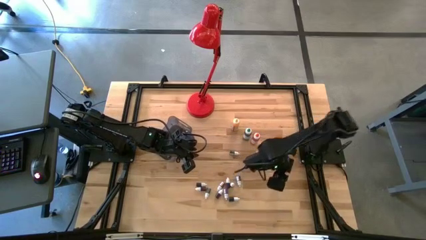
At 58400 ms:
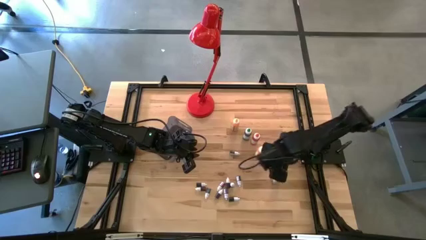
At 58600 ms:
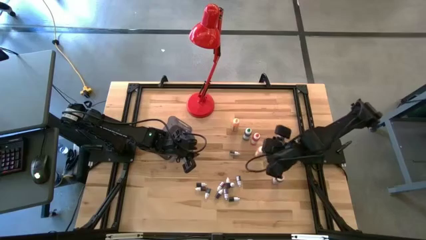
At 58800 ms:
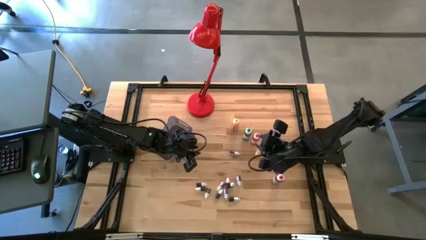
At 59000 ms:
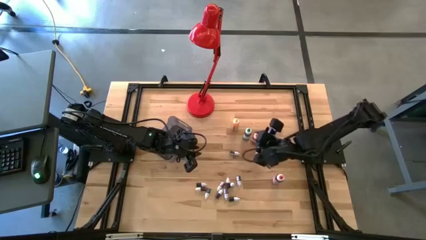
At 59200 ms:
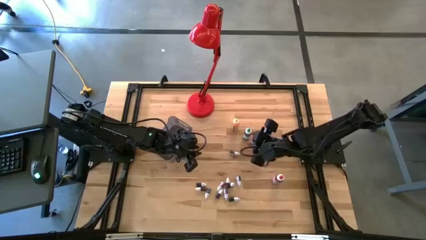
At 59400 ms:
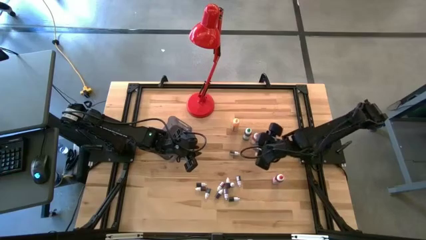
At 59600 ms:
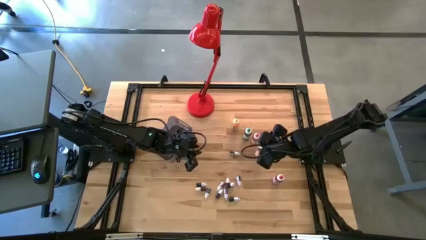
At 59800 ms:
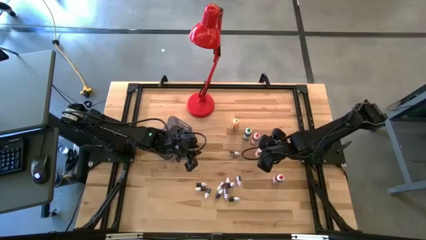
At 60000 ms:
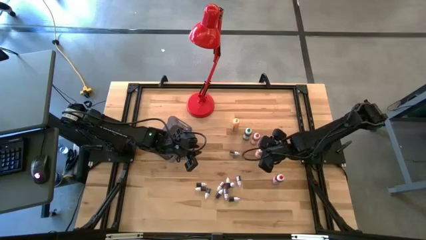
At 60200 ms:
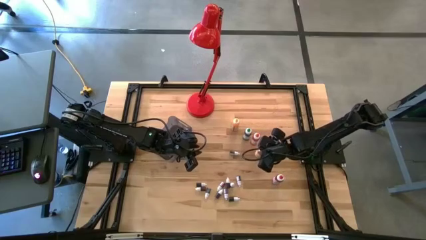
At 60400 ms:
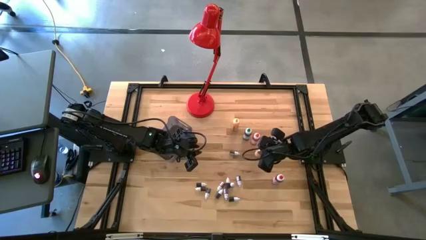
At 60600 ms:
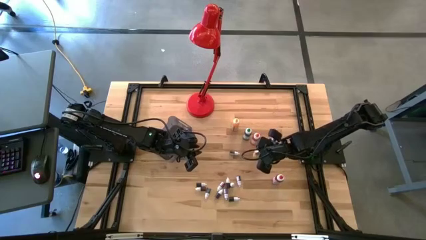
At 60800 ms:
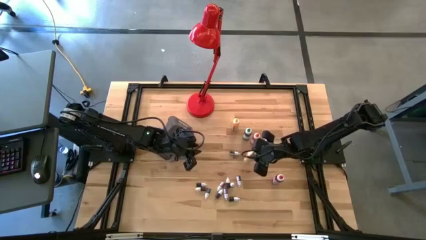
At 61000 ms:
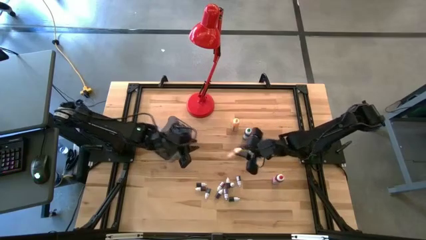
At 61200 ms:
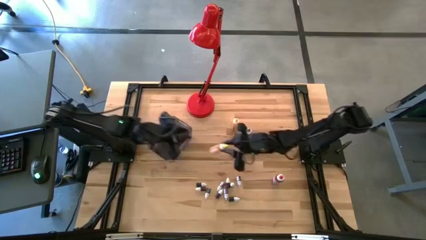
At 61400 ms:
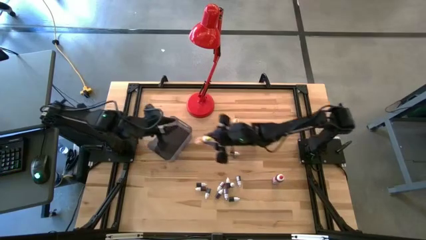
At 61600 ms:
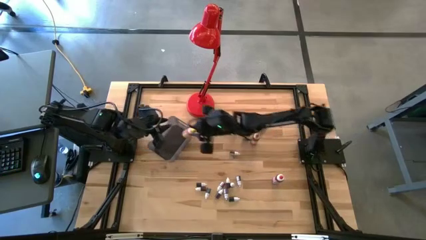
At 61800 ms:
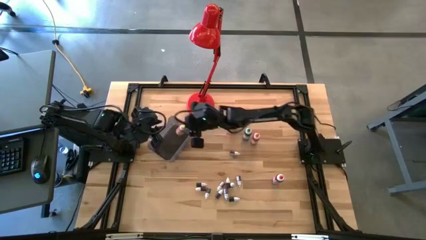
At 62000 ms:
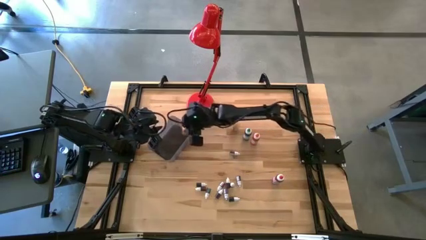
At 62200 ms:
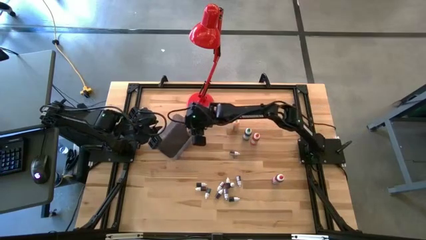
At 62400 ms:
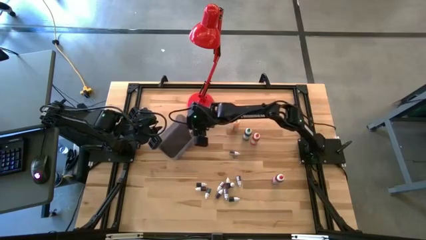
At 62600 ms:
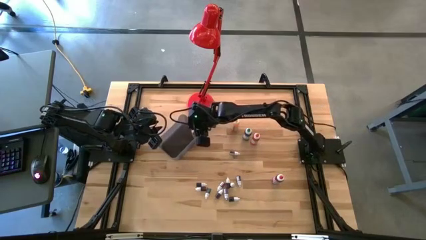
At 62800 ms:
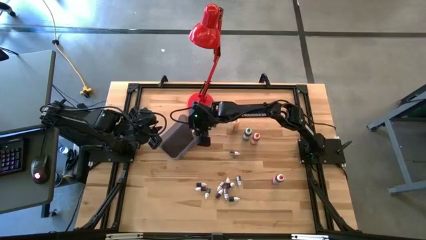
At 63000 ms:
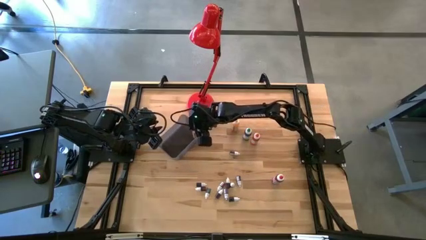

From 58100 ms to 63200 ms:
Task: Pick & Place food coloring
Put the bottom large yellow food coloring bottle into the black bin

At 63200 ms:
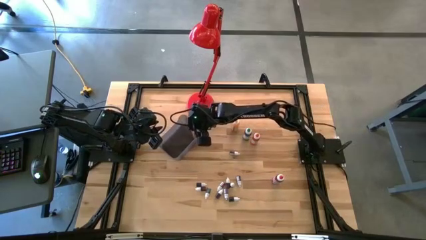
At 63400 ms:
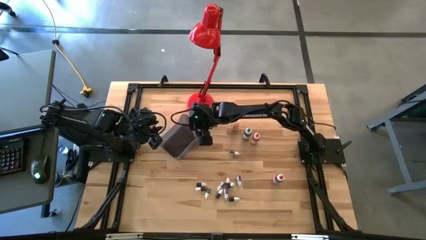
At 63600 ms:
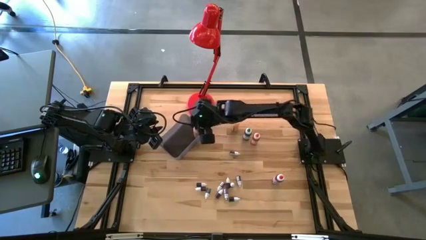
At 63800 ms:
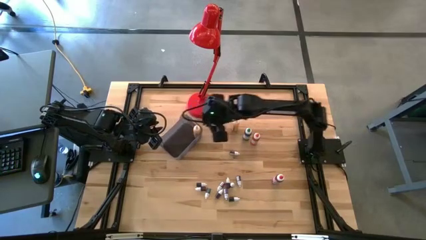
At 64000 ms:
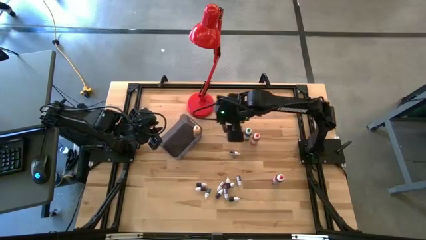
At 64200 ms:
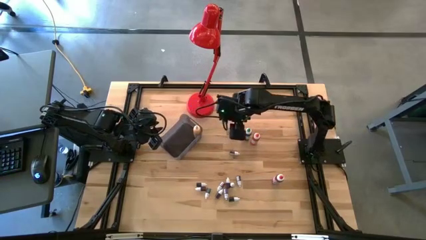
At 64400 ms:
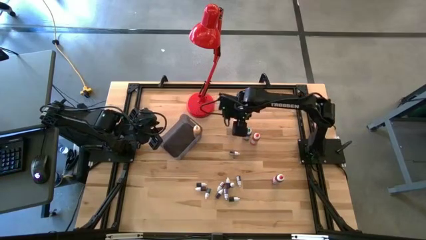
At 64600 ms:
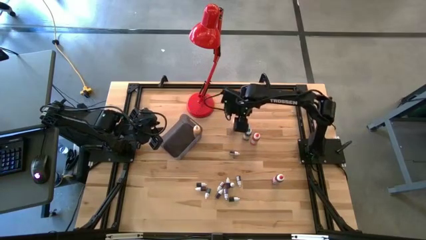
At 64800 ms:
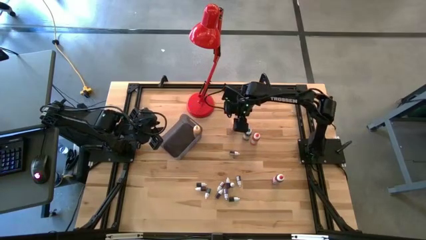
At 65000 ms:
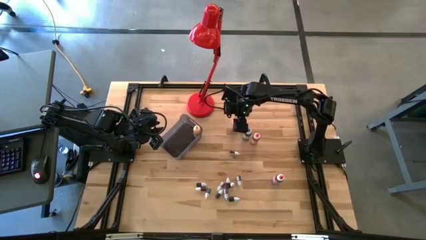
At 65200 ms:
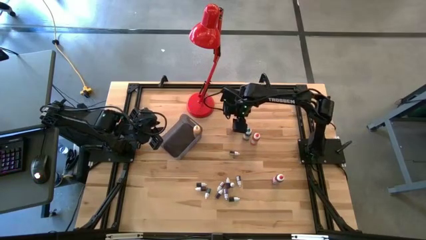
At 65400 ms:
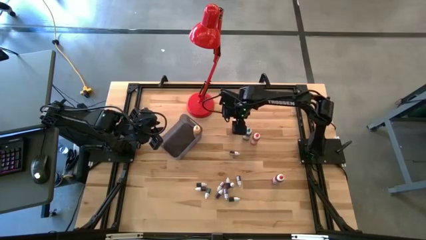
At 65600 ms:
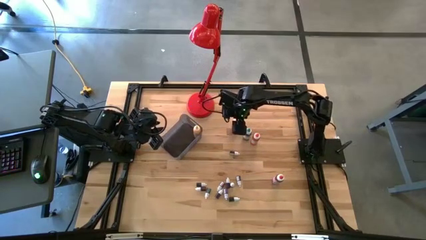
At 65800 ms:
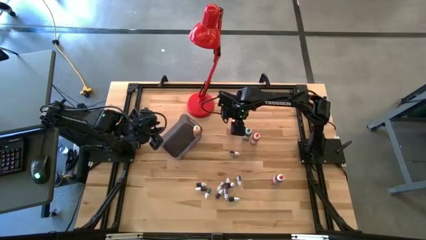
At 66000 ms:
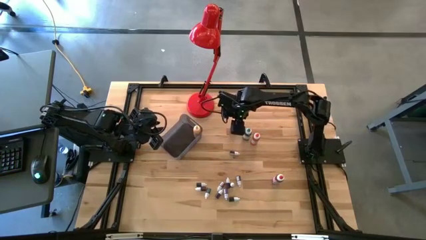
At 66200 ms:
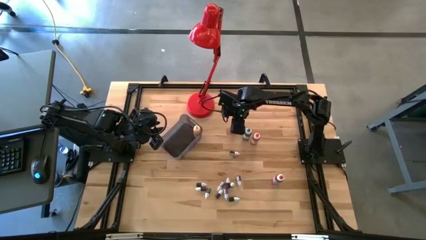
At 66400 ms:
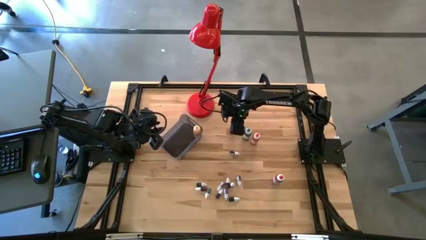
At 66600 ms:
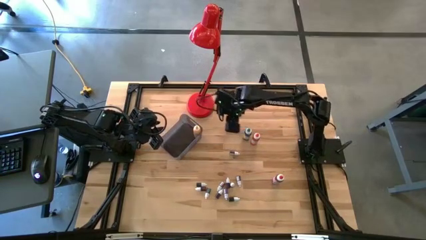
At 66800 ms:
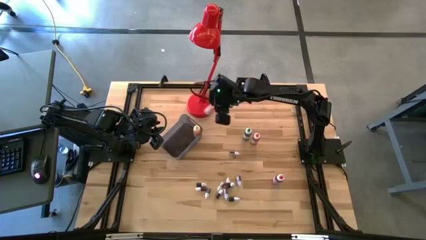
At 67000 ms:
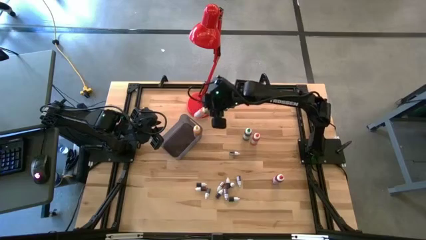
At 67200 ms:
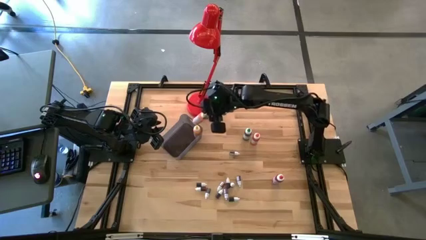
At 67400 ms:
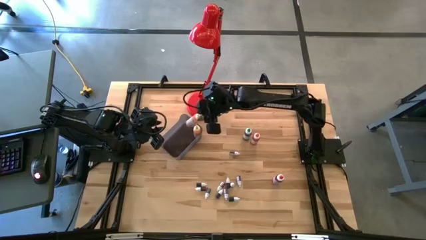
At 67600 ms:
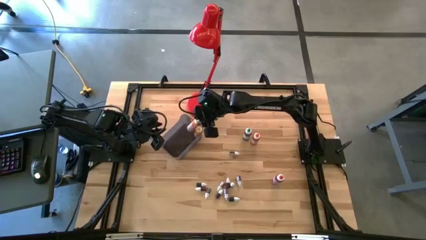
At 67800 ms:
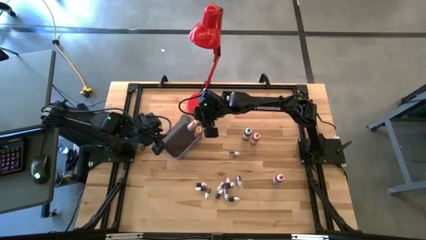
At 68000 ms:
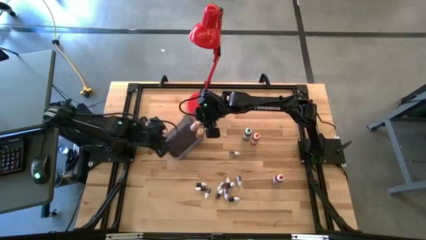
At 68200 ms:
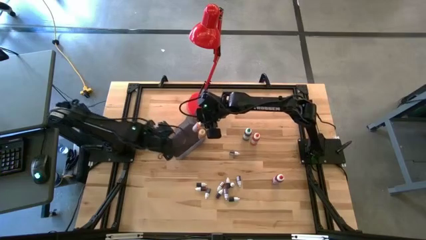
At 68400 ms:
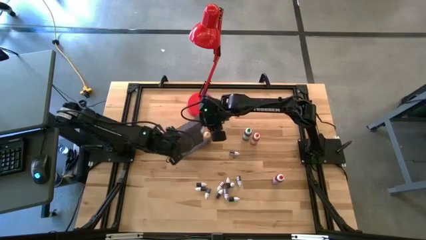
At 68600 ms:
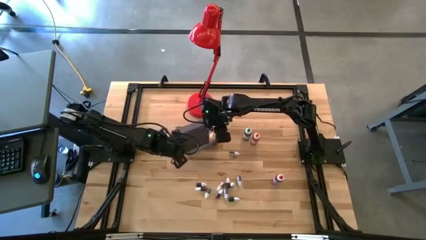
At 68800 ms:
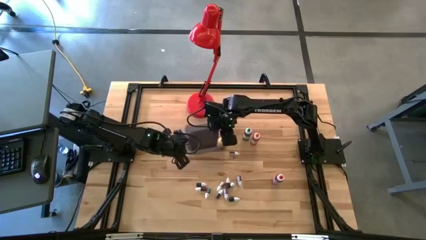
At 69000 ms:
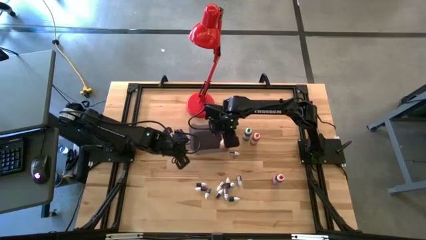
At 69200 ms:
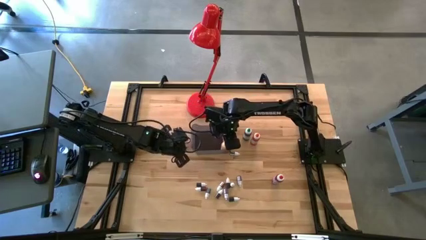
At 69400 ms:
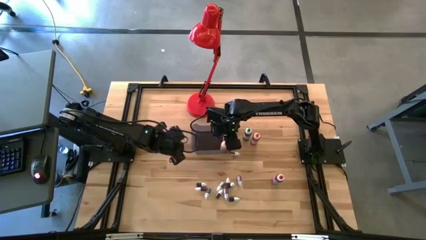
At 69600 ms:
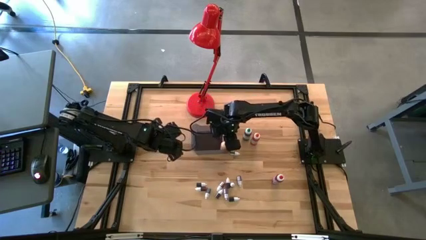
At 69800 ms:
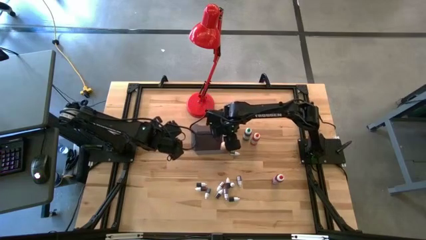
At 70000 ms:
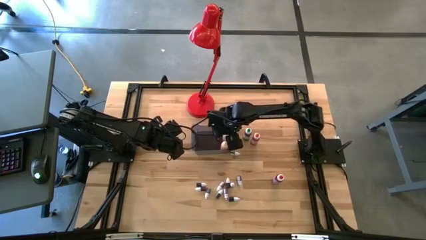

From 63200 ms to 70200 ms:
Put the large yellow food coloring bottle into the black bin

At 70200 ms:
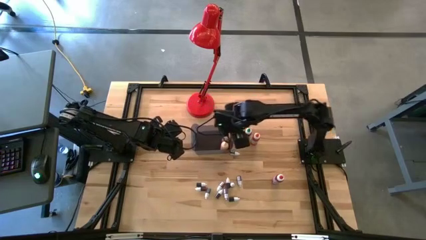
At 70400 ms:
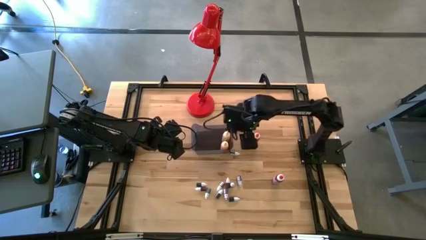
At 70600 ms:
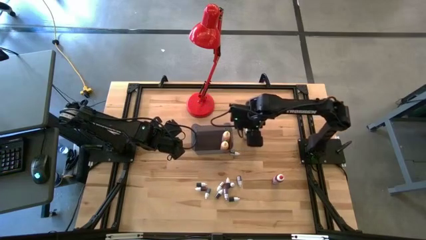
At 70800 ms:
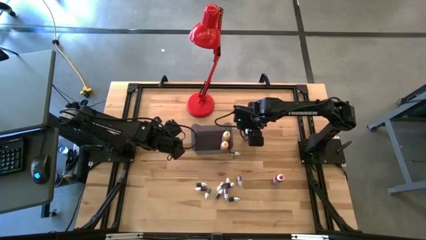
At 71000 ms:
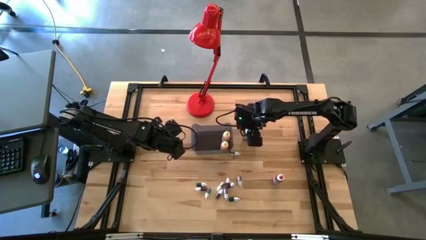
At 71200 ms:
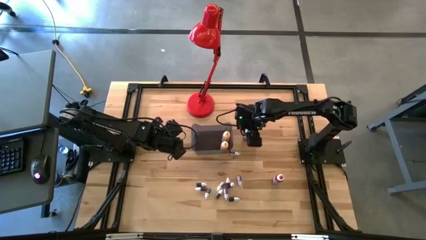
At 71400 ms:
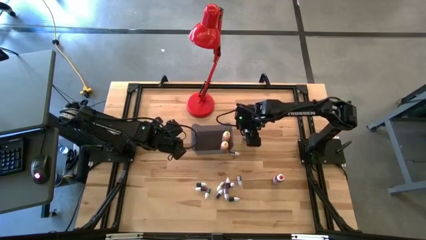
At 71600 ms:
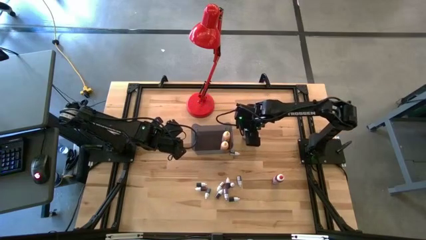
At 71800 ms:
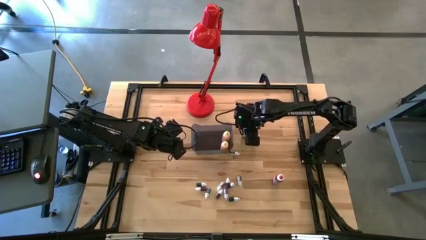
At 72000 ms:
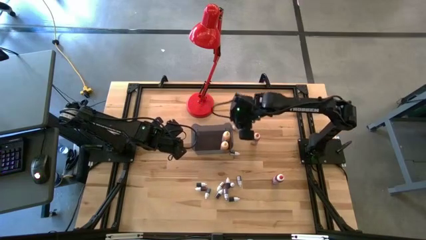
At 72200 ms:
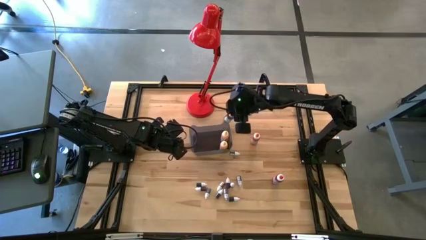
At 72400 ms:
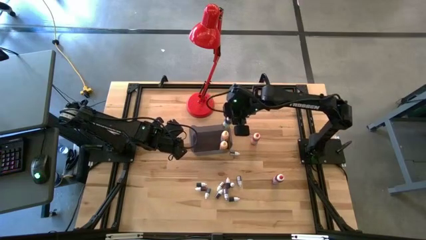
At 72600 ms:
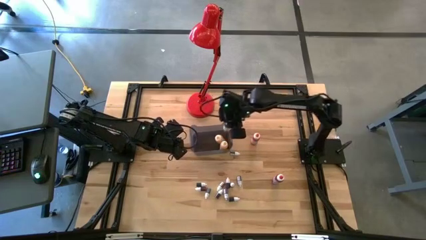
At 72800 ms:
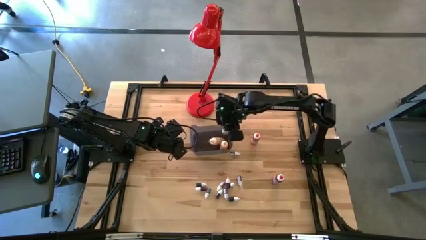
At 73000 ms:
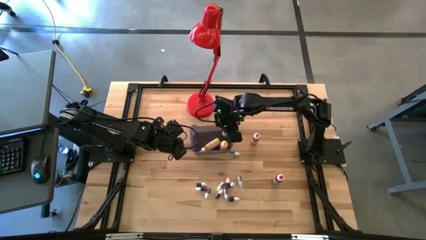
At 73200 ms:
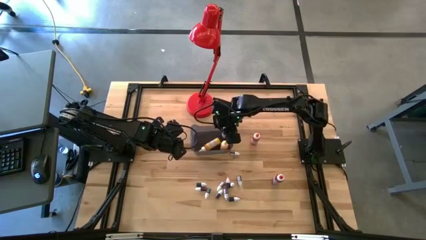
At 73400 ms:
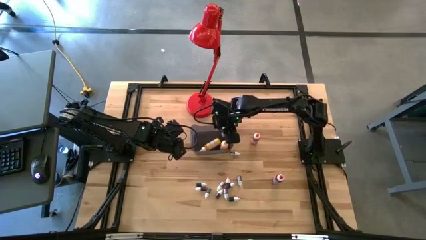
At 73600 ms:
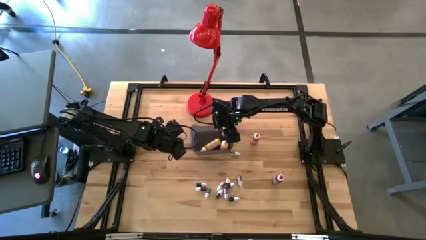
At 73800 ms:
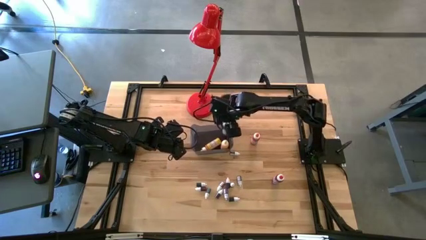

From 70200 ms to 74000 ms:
Put the large green food coloring bottle into the black bin

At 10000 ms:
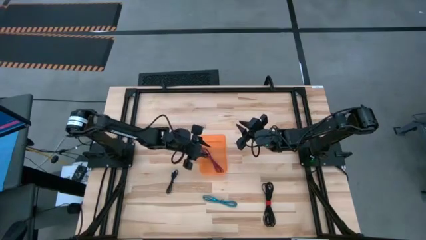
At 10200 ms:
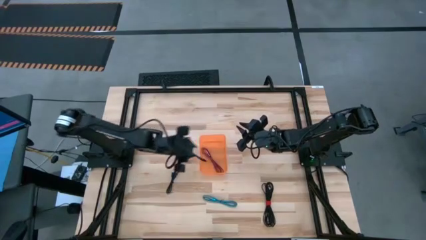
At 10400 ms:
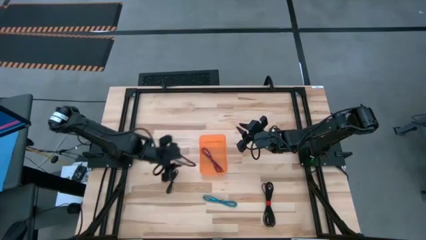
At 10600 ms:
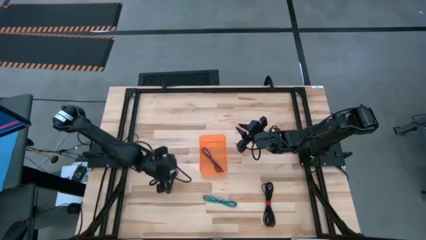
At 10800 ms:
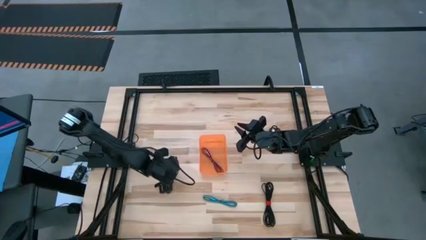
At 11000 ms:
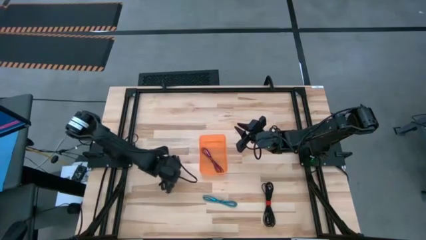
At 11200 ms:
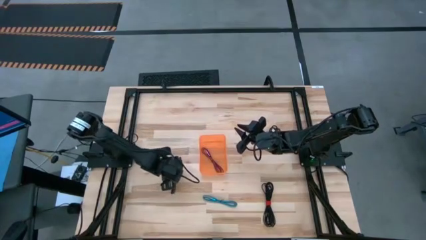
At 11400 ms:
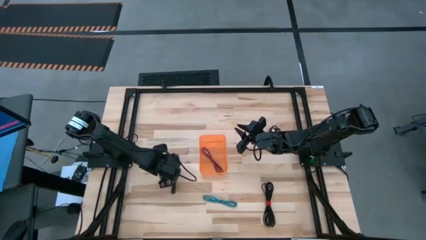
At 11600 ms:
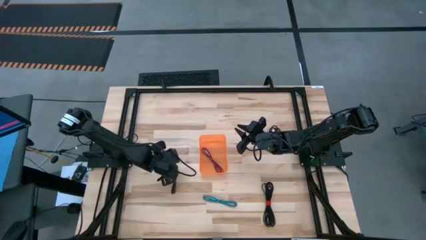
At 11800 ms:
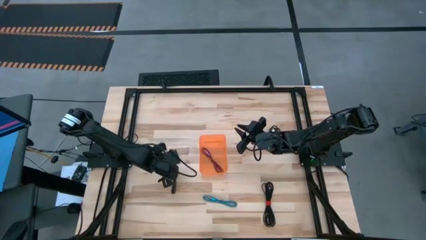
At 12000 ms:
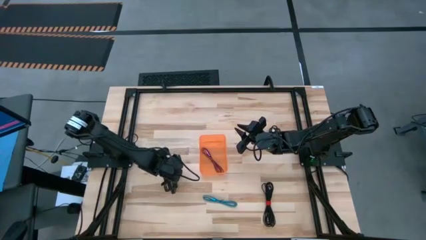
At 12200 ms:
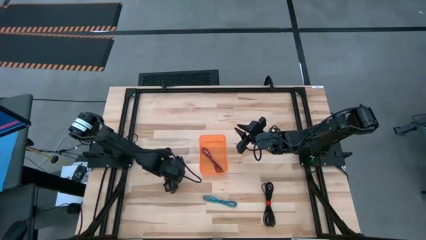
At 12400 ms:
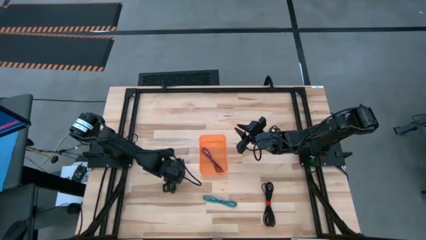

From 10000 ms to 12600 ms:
Task: Pick and place USB-C Cables
Put the left black charger cable into the orange bin
